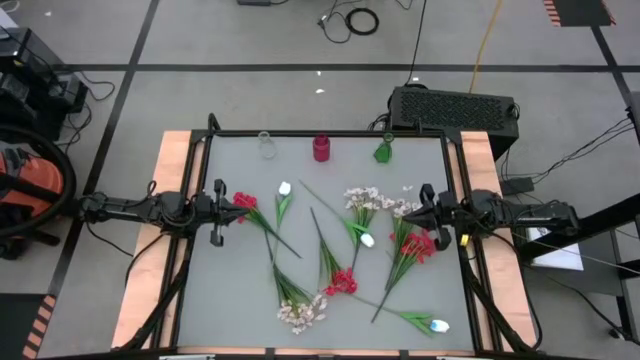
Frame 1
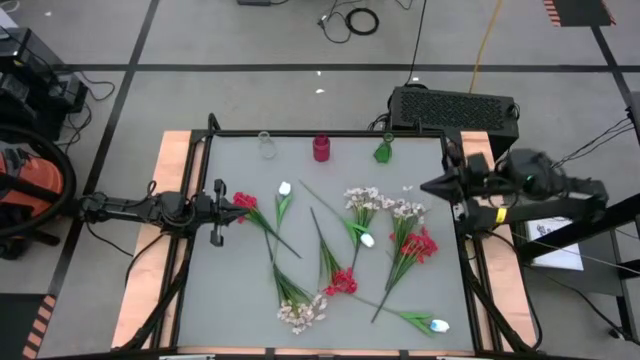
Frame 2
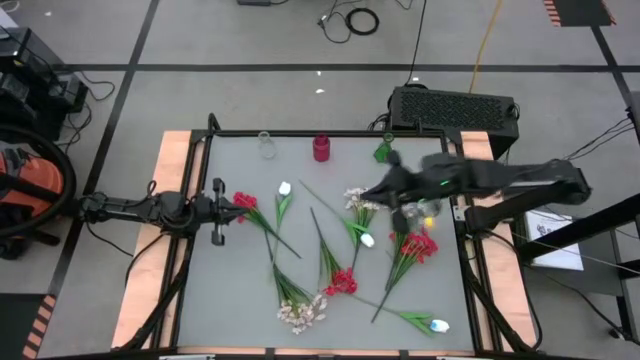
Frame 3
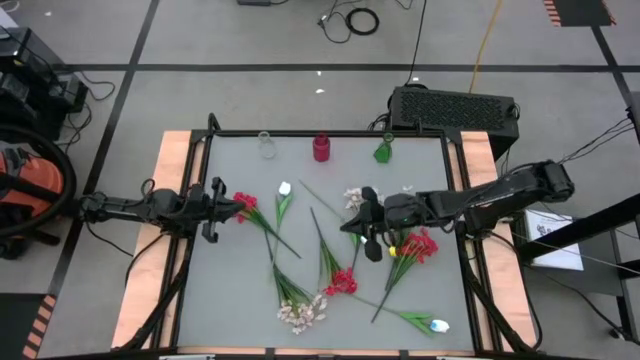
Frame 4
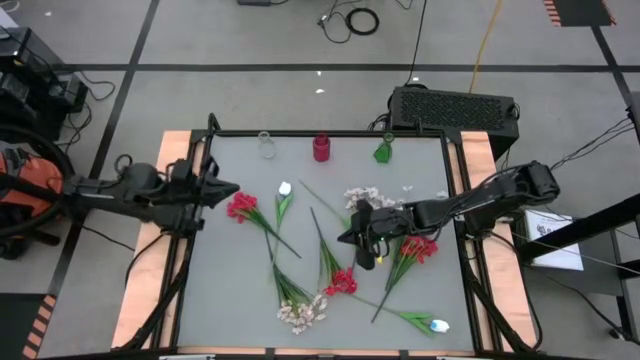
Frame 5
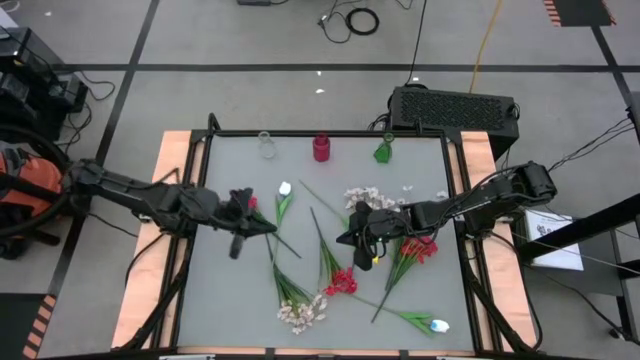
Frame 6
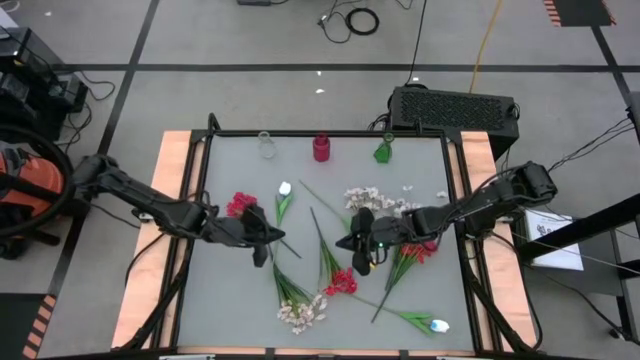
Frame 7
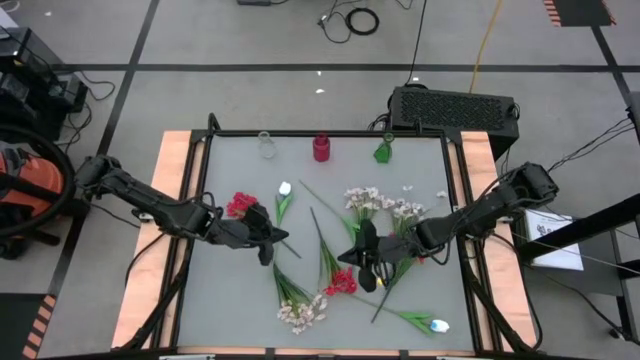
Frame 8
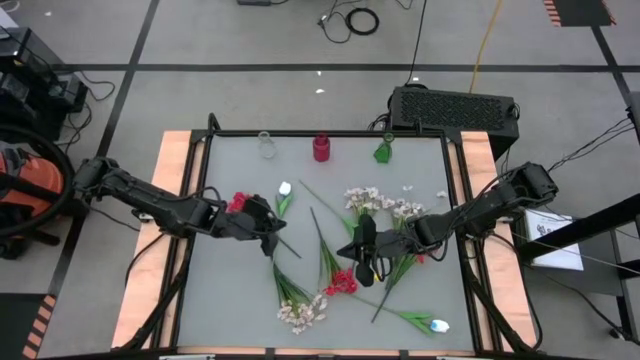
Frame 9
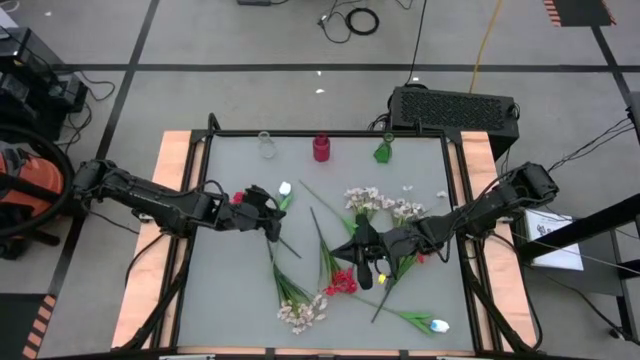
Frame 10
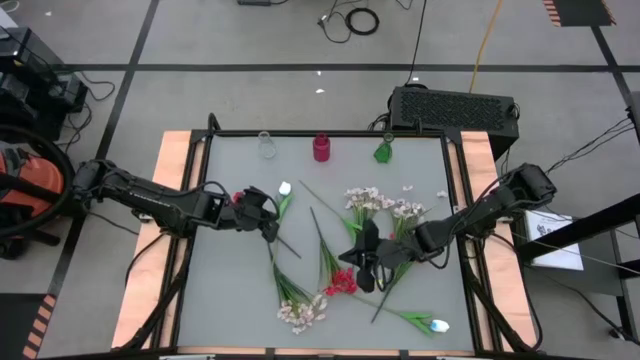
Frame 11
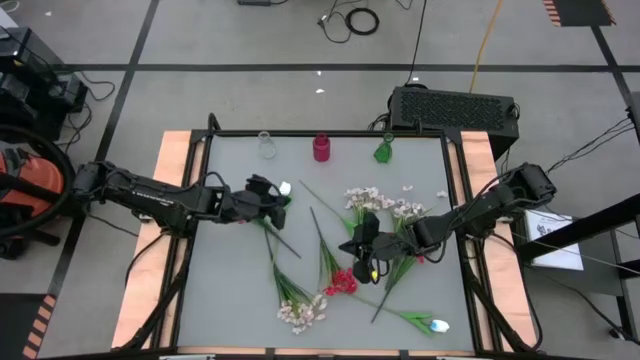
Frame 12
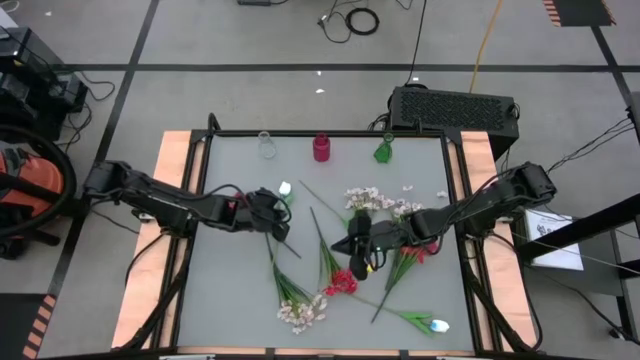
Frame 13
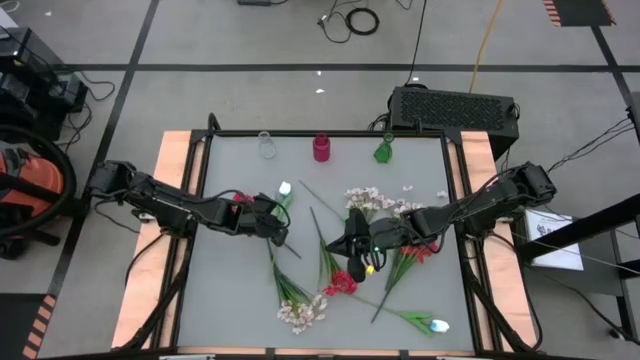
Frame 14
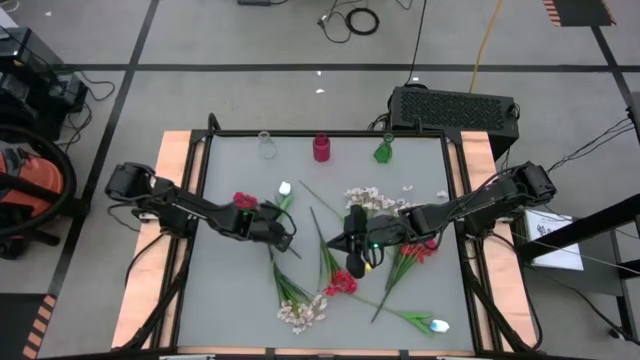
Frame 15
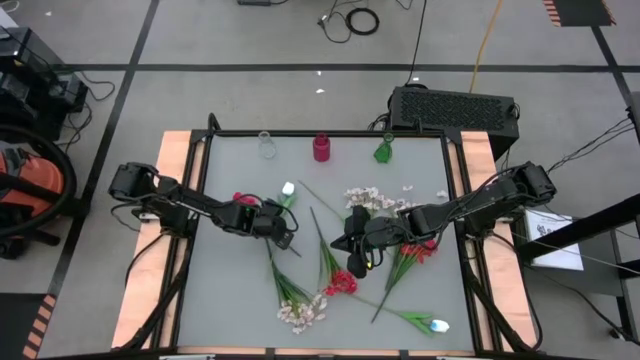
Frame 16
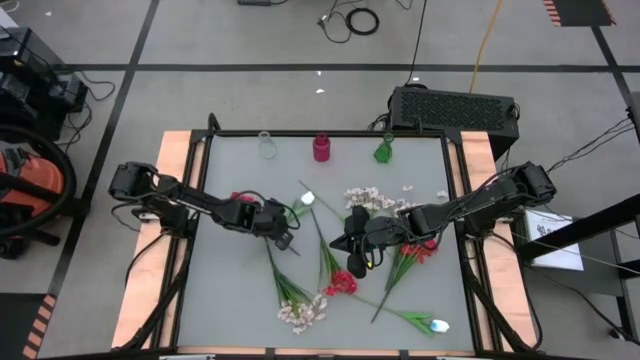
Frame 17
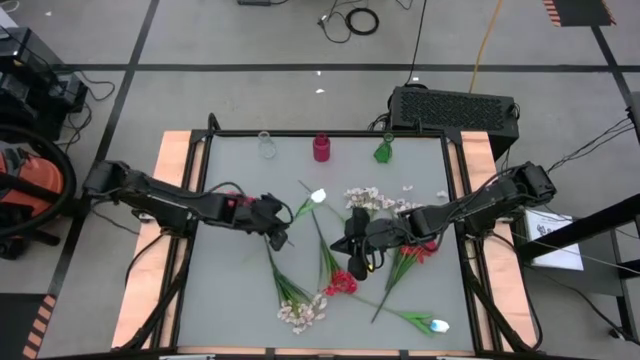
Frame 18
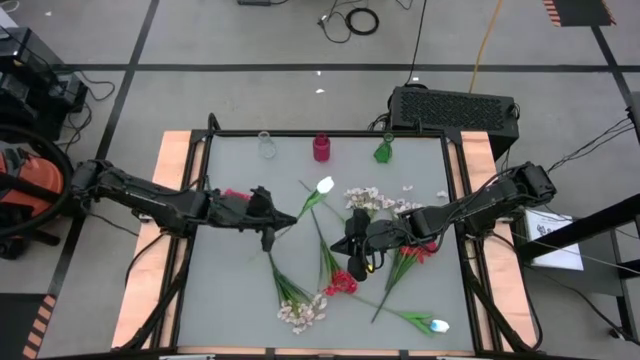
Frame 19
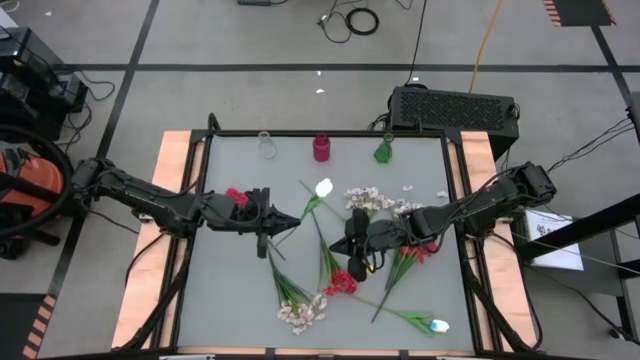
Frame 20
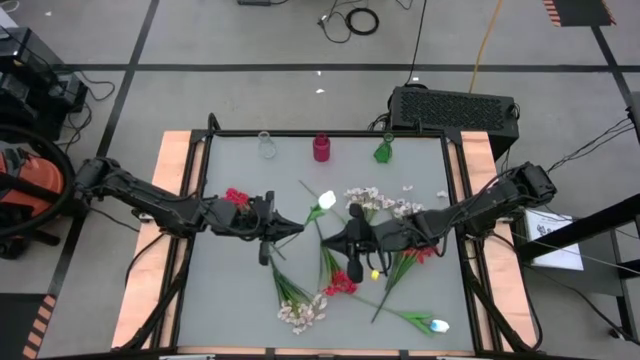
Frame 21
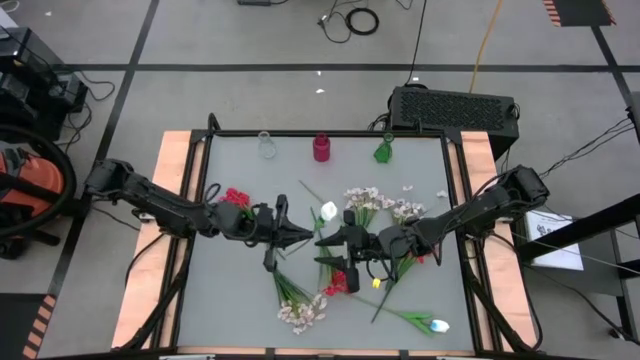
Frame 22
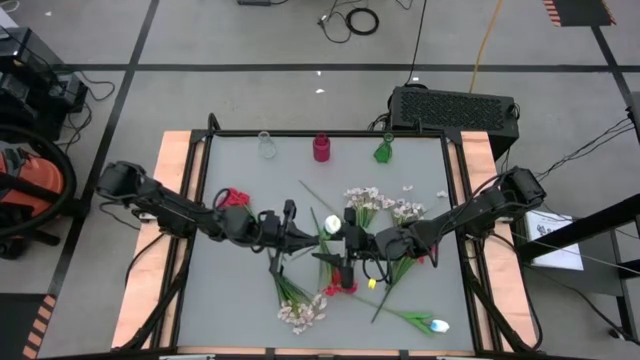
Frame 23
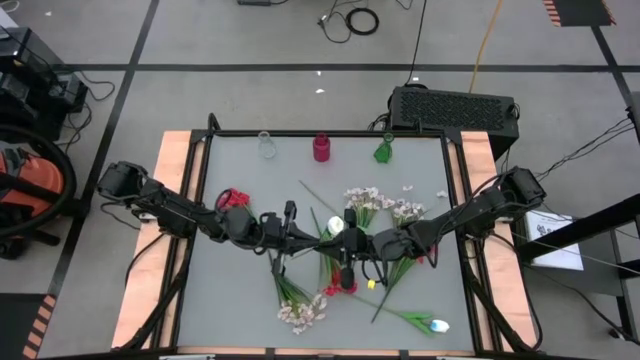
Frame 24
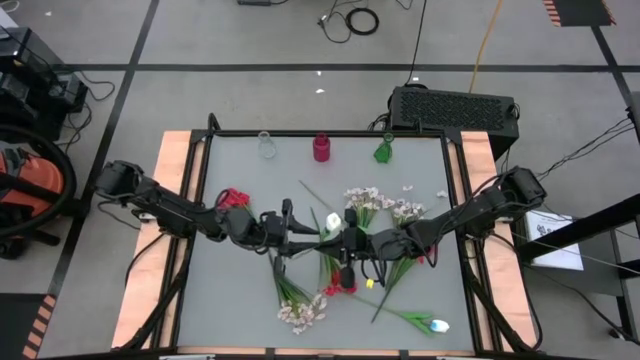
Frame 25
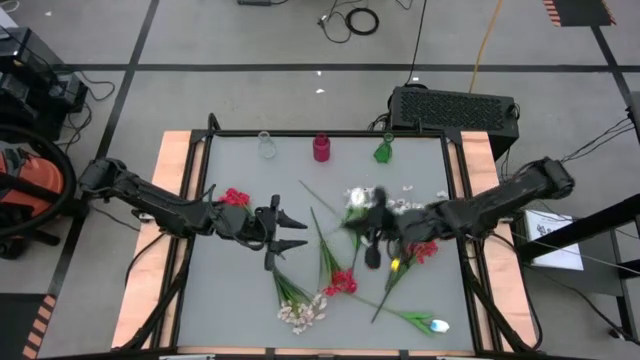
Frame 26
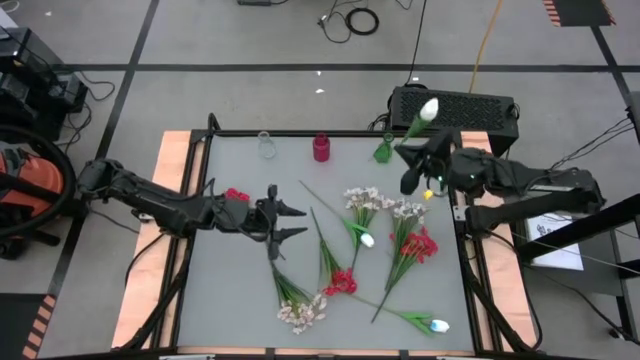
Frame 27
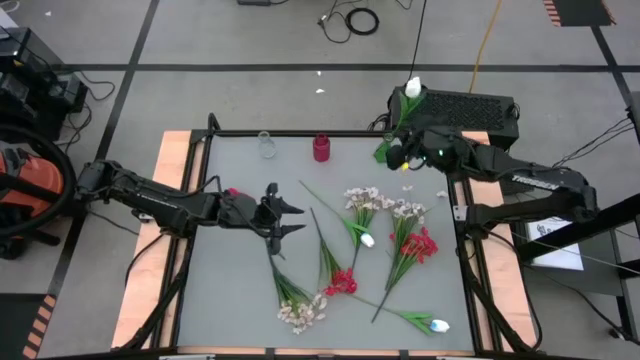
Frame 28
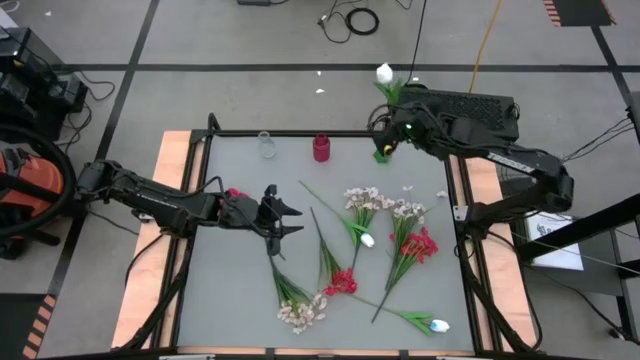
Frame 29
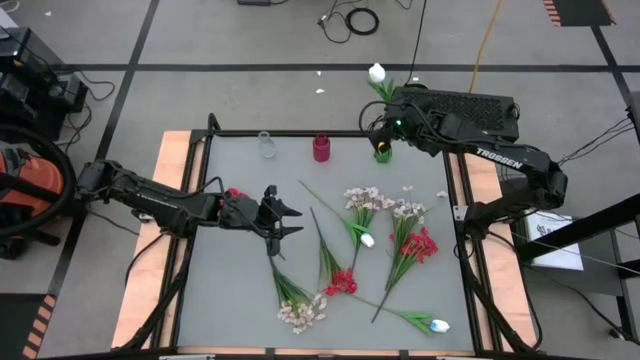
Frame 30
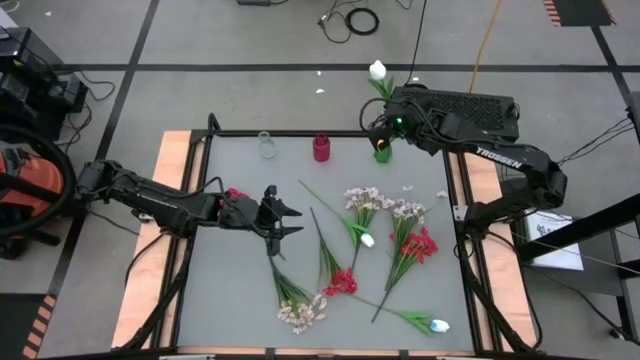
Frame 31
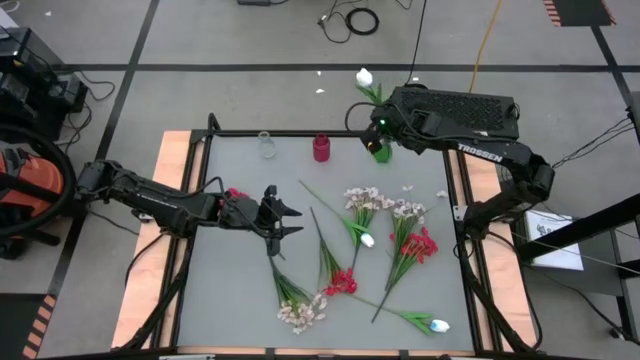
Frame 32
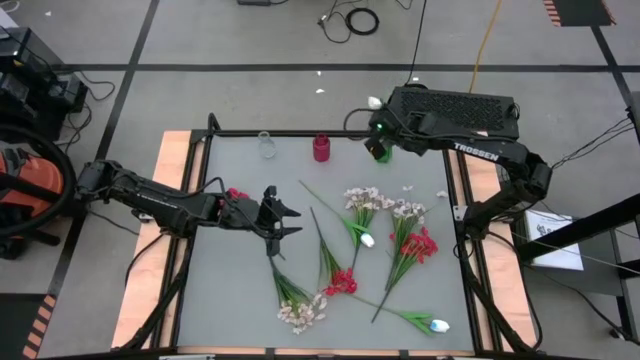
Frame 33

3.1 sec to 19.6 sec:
Task: Sort flowers into vase by color
Put the top left white tulip into the green vase

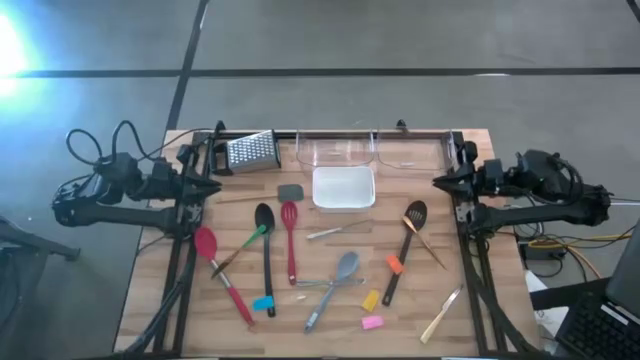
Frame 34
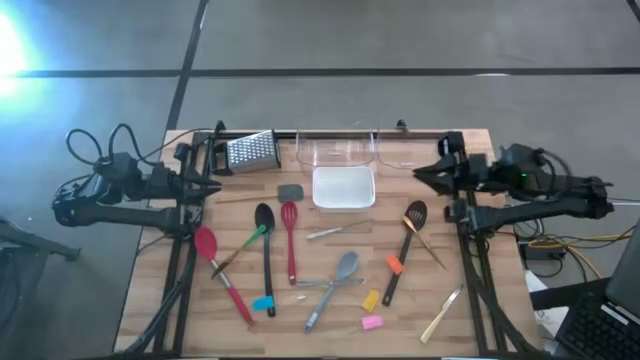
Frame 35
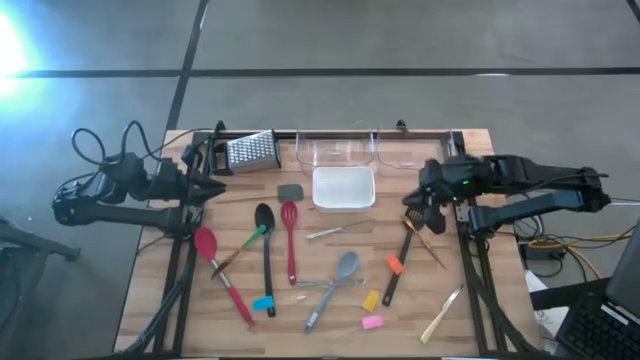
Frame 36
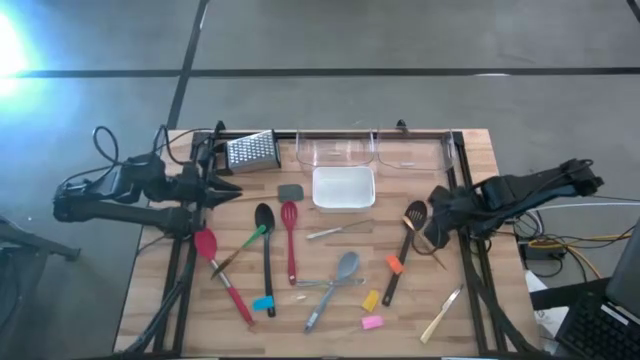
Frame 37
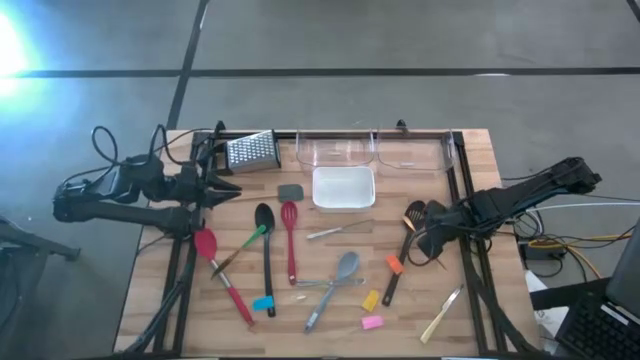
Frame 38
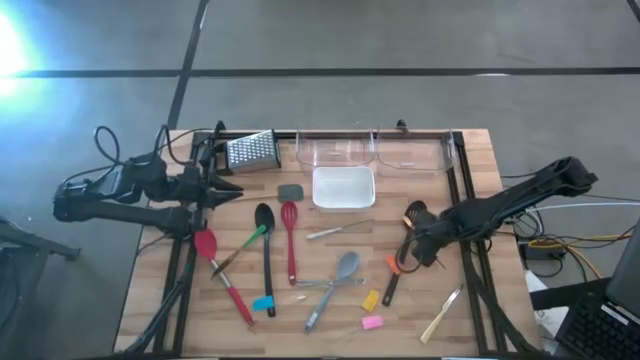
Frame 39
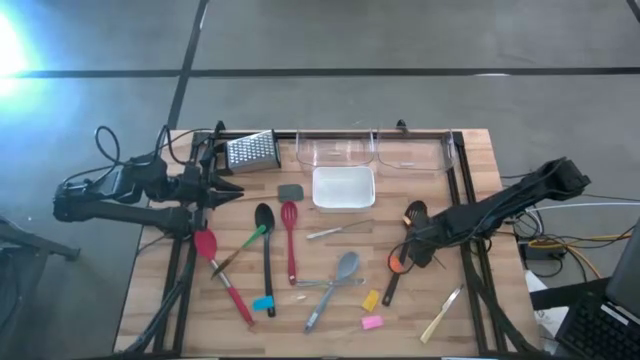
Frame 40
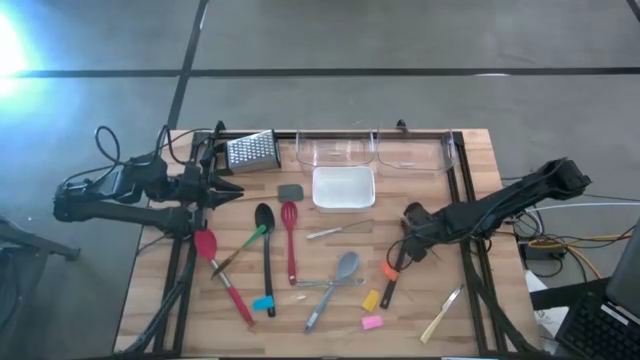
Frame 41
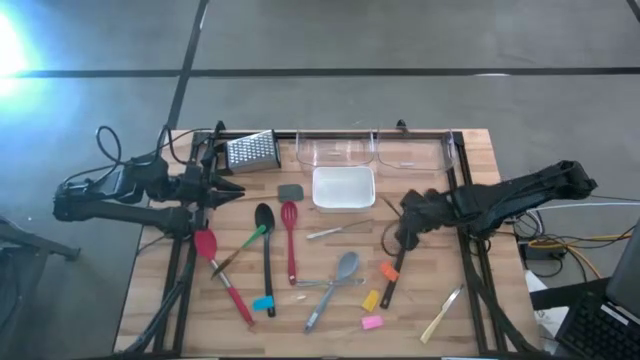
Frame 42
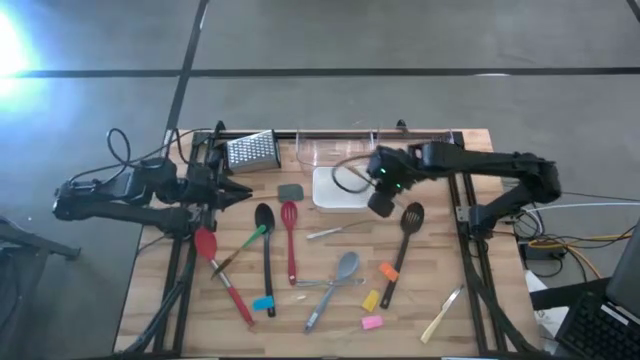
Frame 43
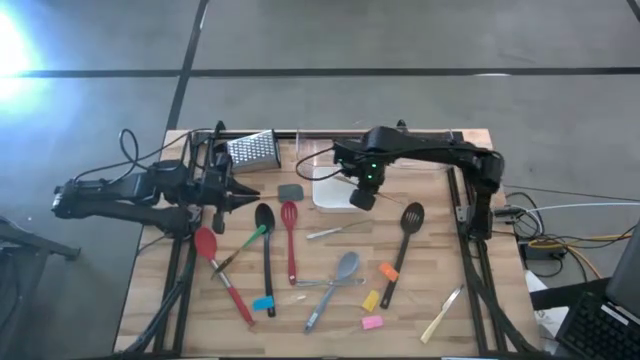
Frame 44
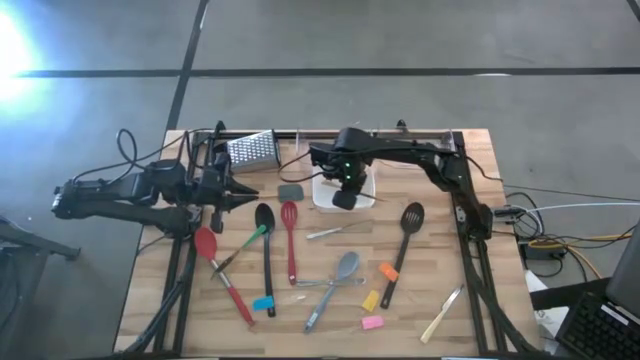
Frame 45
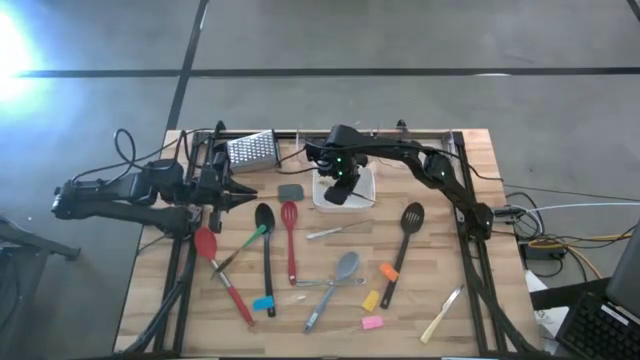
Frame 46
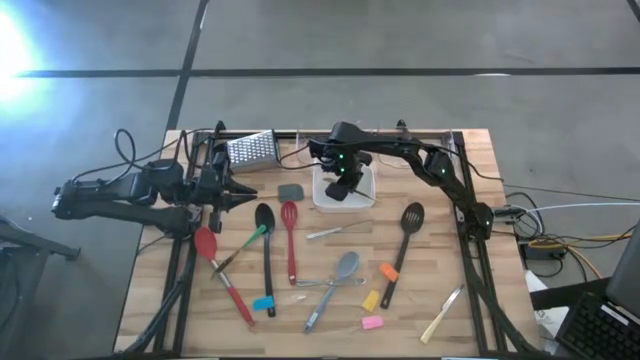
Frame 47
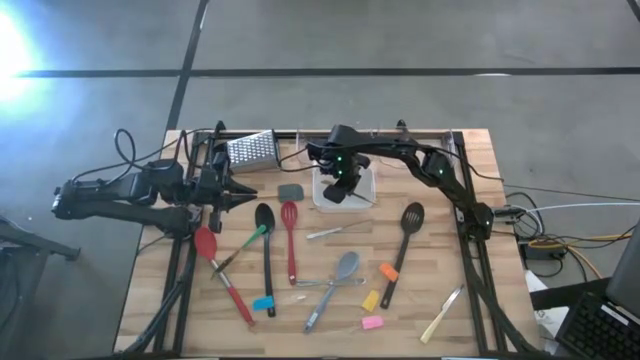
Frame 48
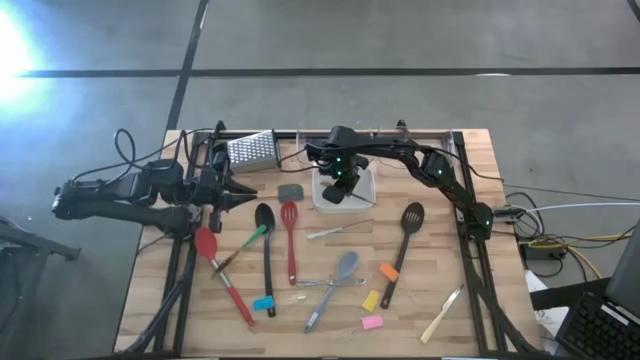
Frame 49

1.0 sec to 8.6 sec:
Task: Pick & Place Kitchen Items
Put the gold table knife into the white bin
